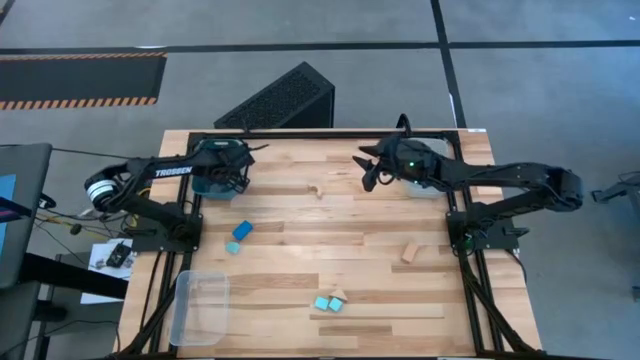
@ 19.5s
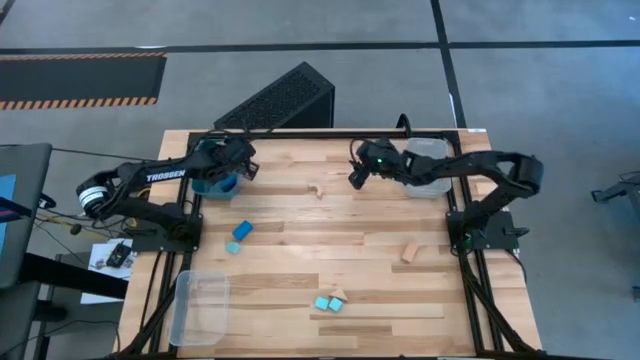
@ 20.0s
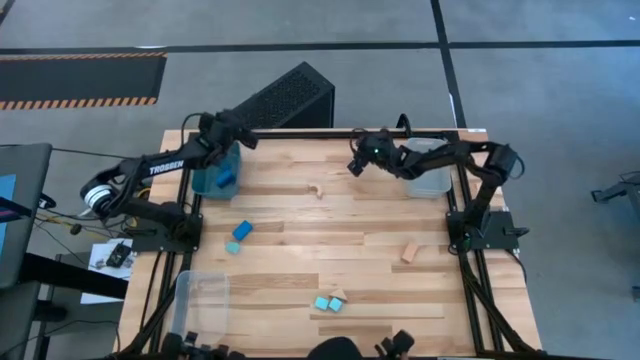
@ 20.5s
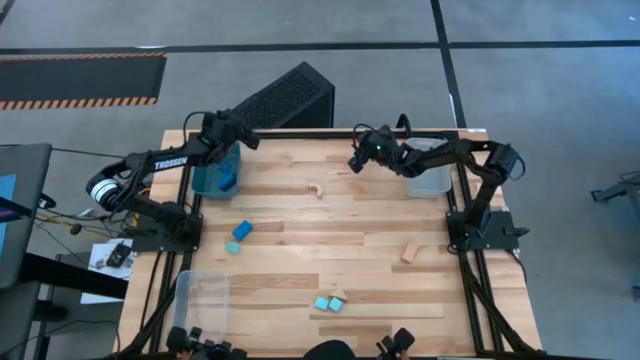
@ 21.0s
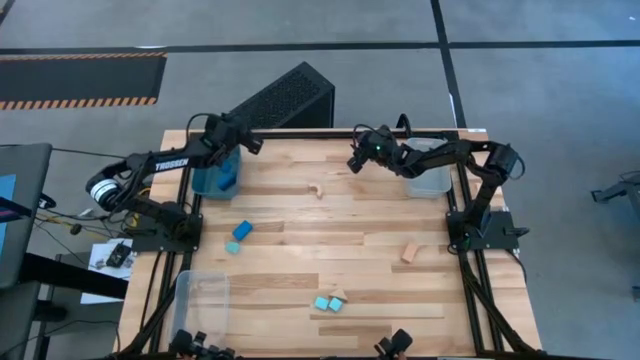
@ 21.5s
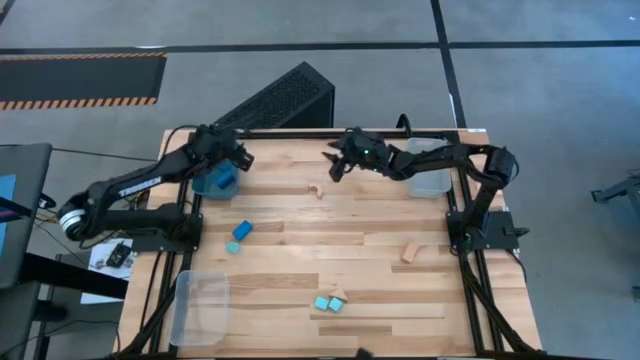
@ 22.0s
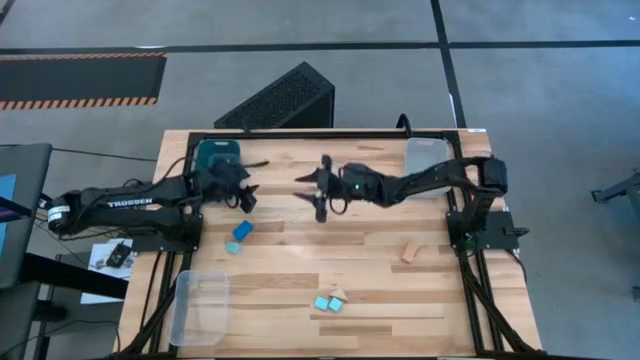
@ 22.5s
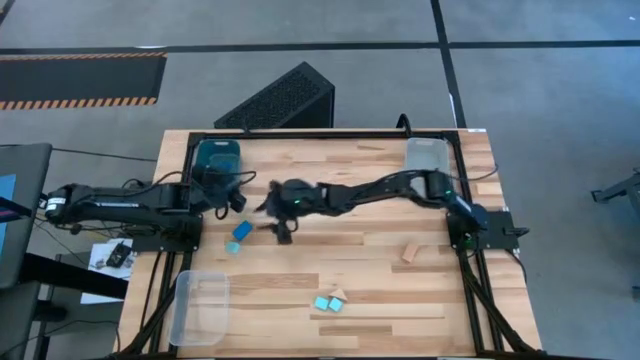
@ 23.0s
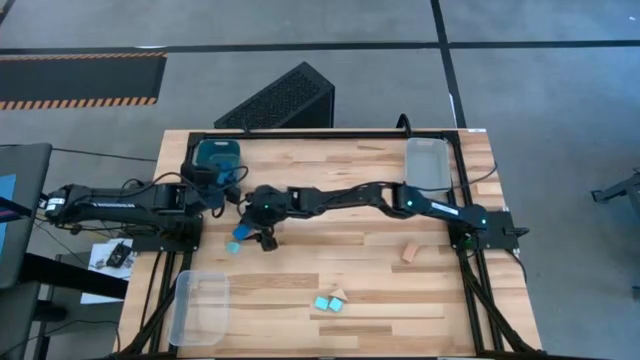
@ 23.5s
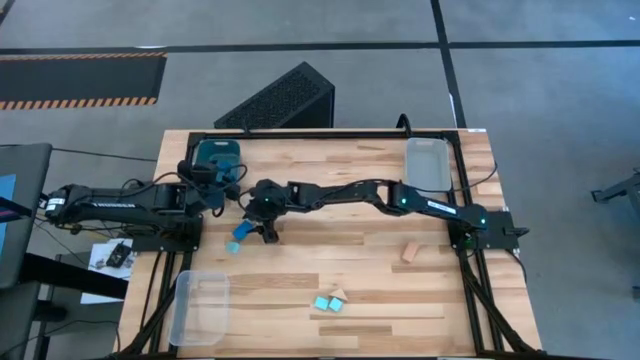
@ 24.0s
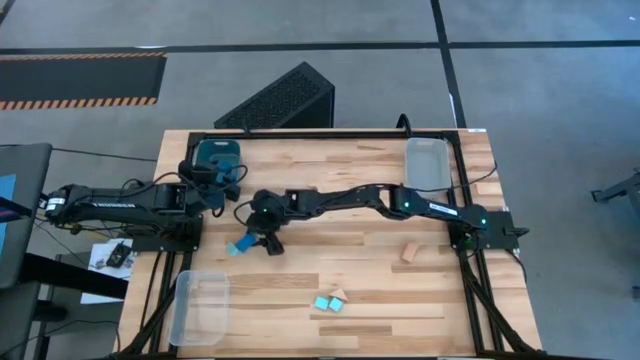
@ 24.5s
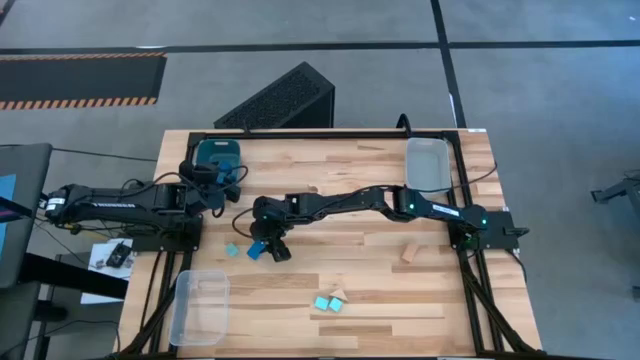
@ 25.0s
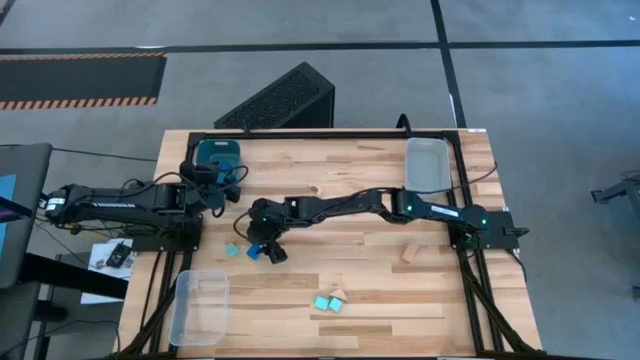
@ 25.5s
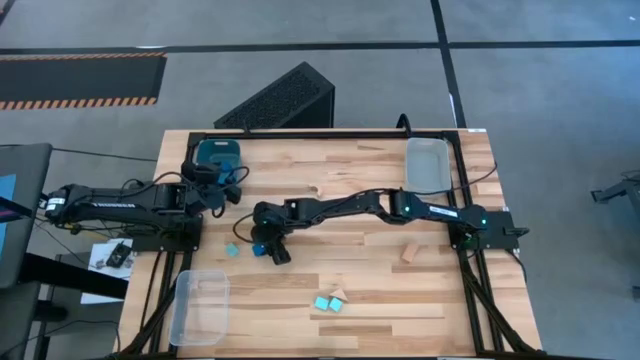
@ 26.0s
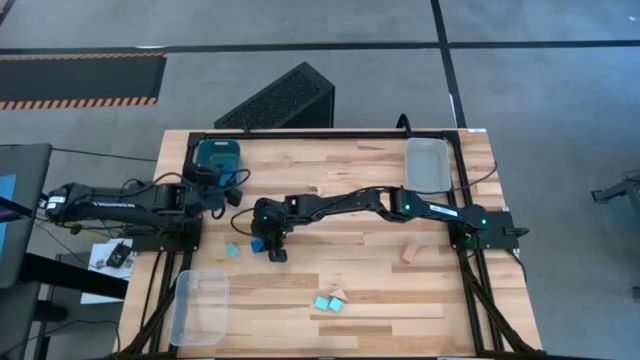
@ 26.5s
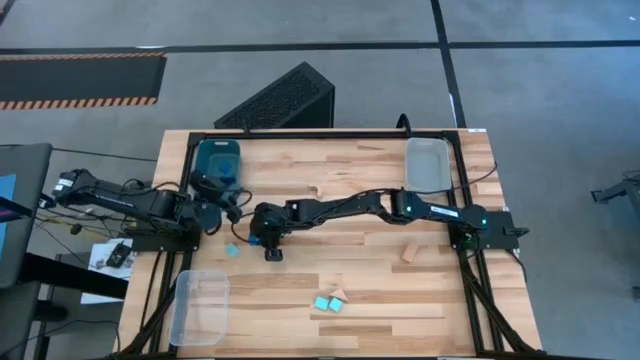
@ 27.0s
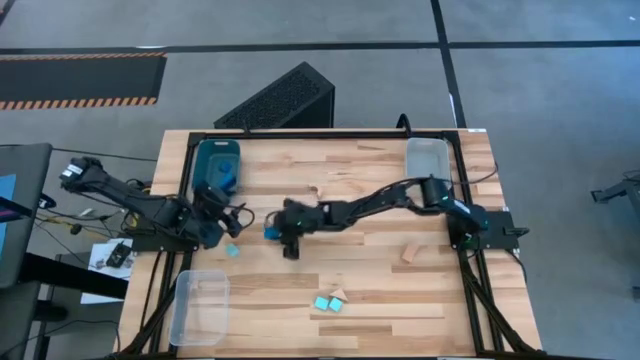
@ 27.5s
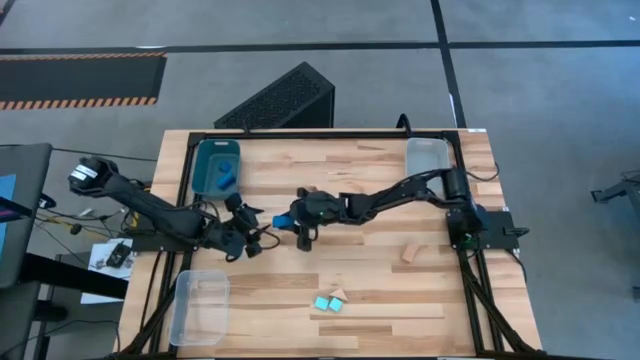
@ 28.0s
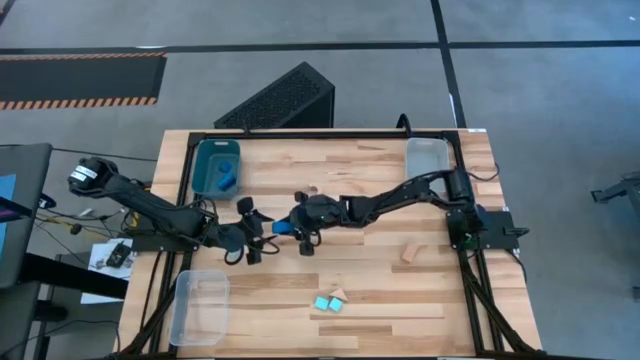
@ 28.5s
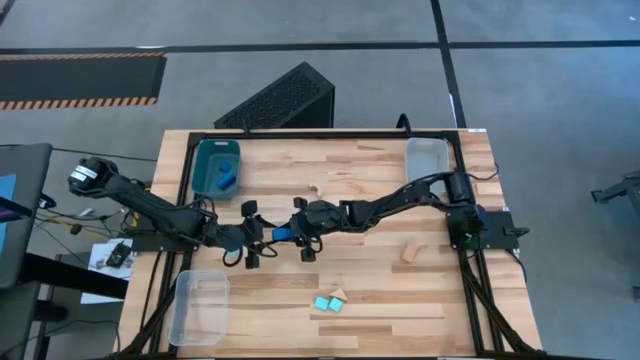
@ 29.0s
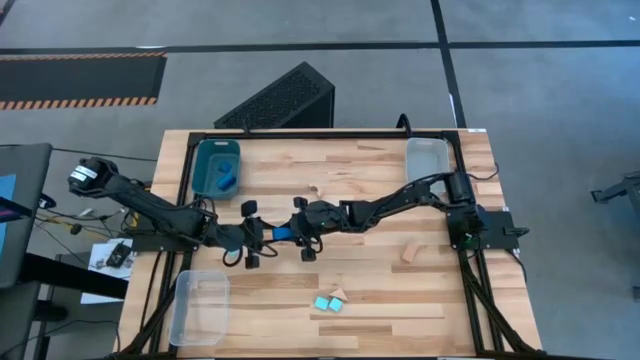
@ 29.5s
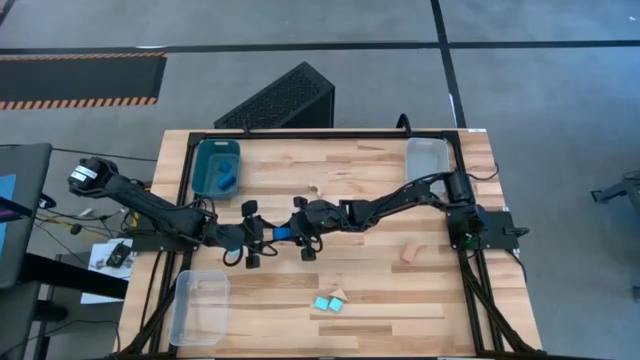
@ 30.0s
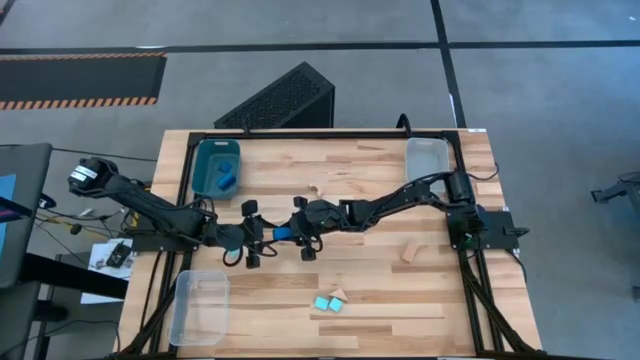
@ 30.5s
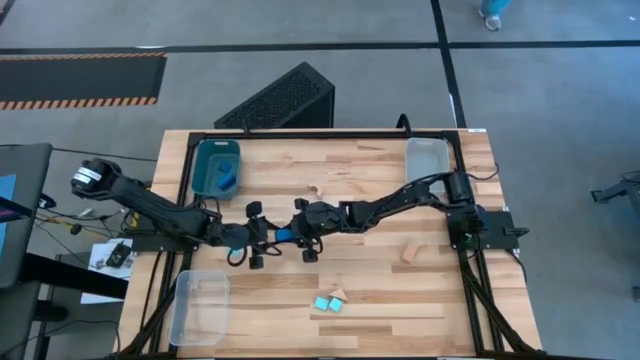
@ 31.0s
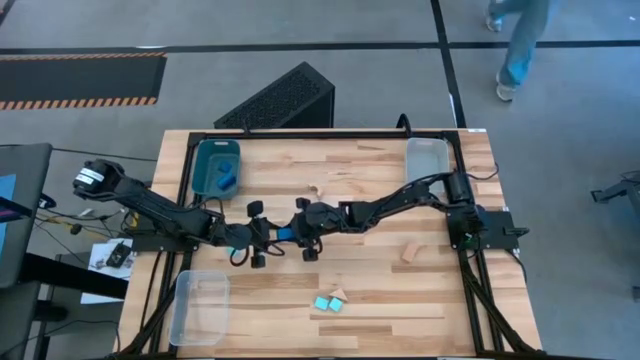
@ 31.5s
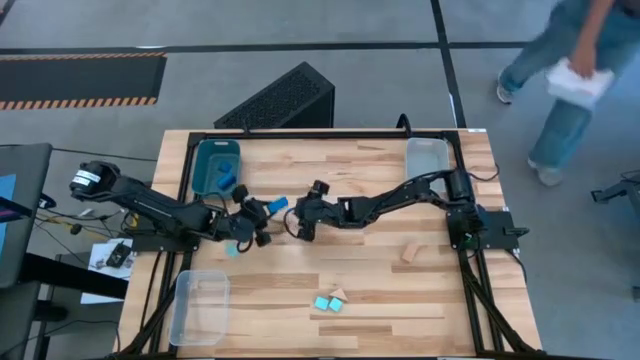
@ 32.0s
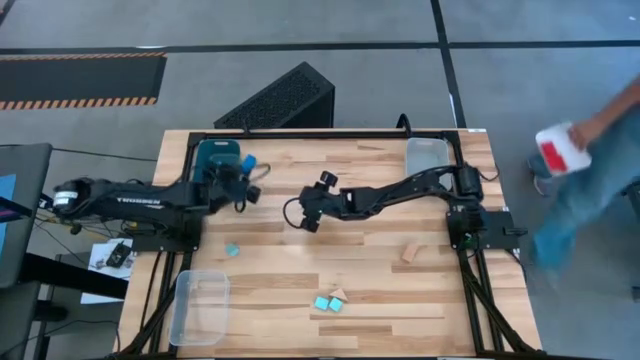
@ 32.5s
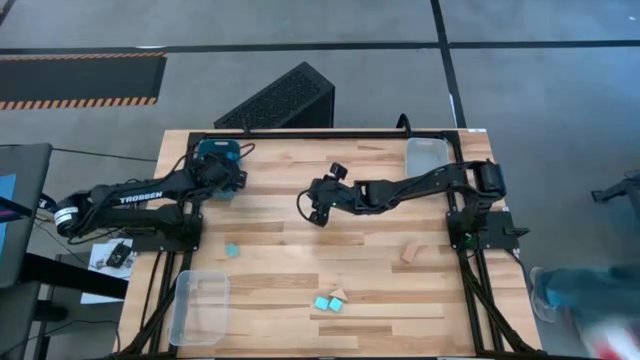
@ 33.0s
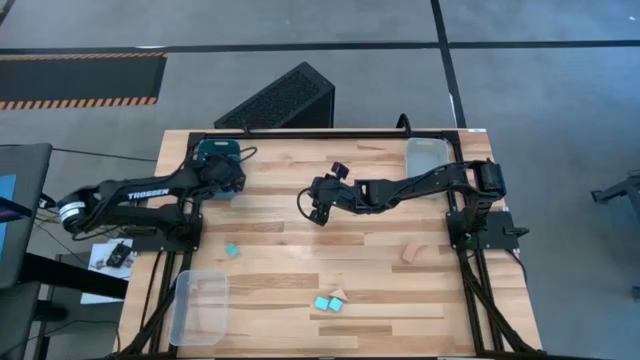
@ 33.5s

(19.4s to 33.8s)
Task: Sort & place blocks by color
Put the blue block into the blue bin

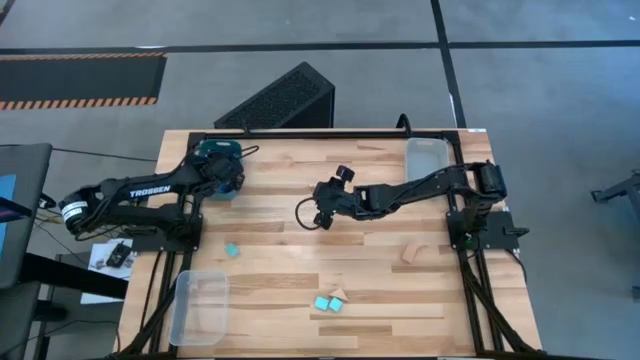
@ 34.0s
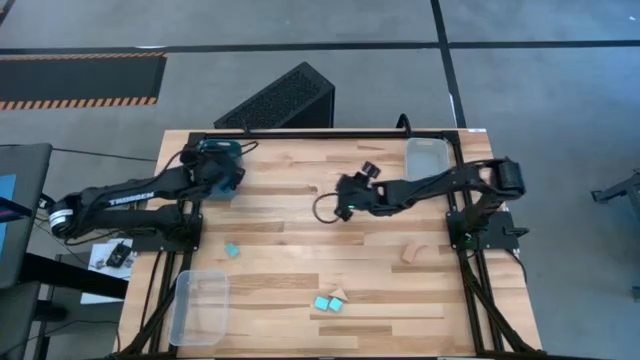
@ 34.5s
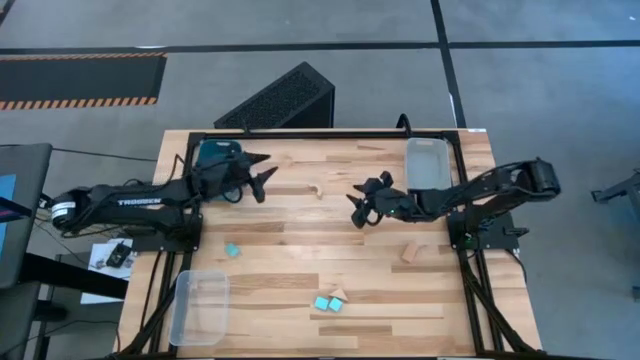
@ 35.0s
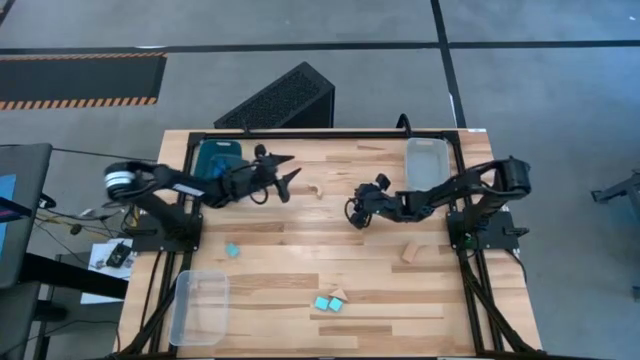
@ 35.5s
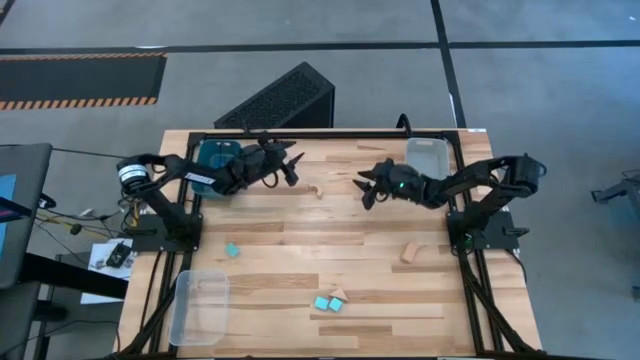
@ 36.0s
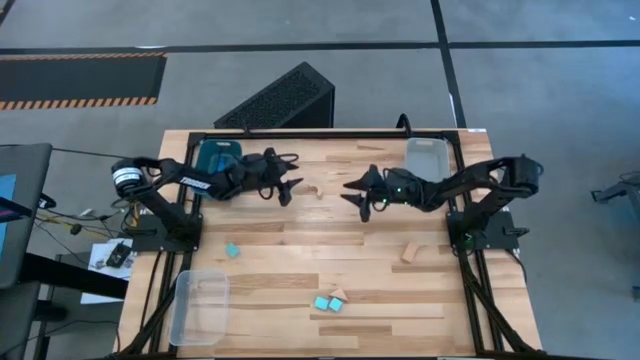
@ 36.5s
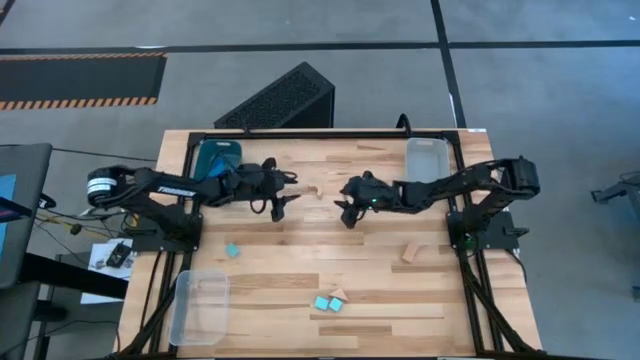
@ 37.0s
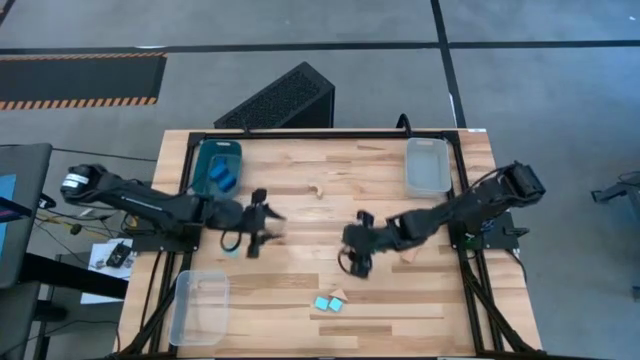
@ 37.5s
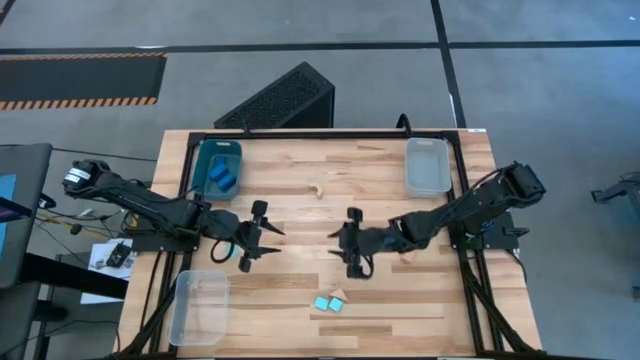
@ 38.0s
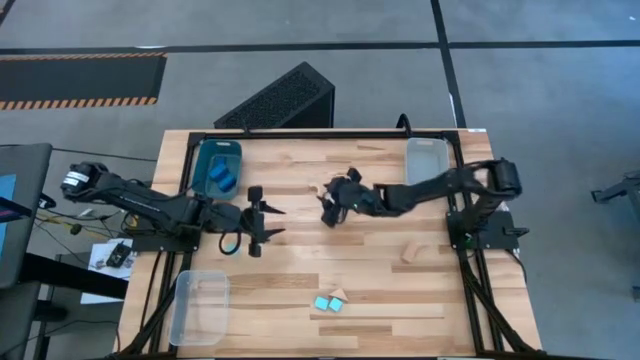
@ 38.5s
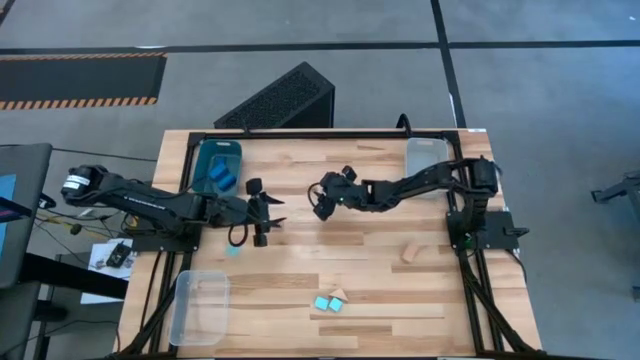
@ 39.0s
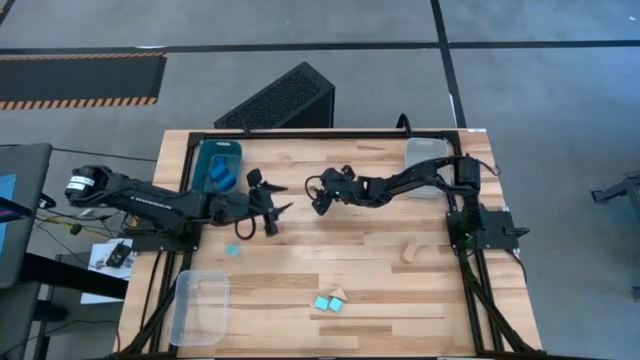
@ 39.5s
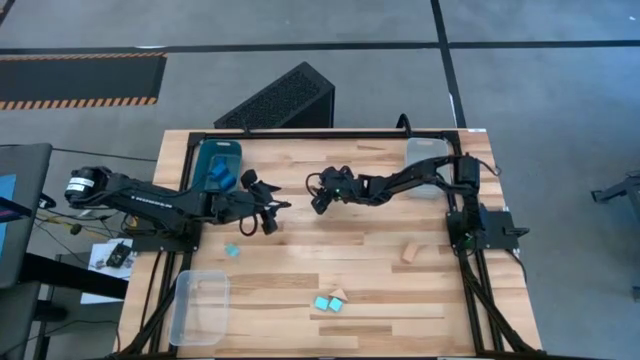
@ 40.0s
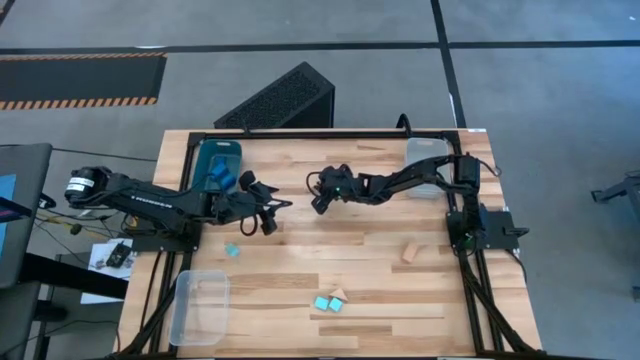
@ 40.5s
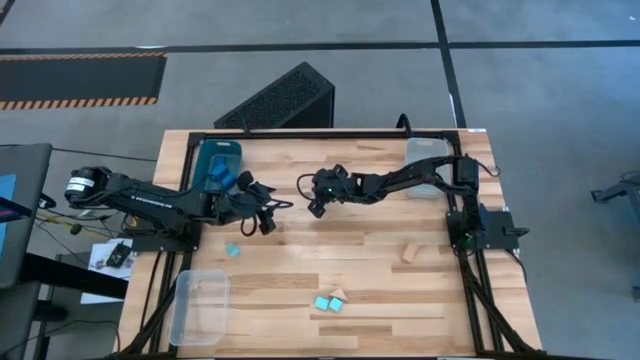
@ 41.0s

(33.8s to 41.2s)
Put the top brown block into the transparent bin
